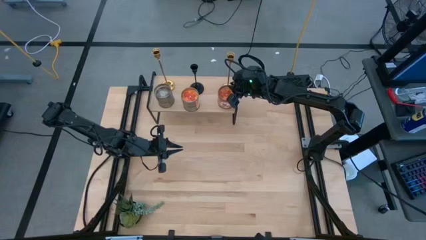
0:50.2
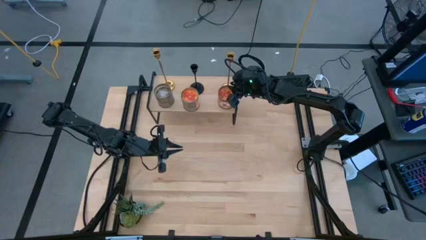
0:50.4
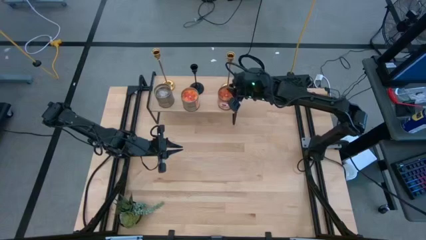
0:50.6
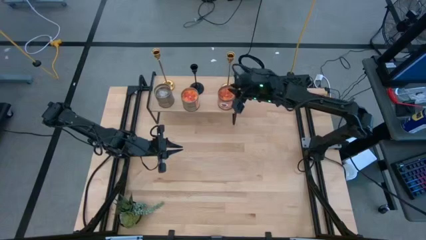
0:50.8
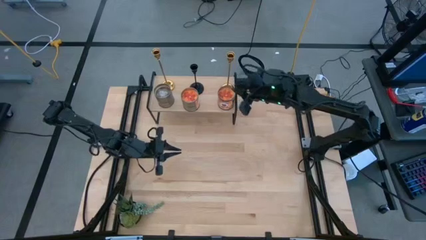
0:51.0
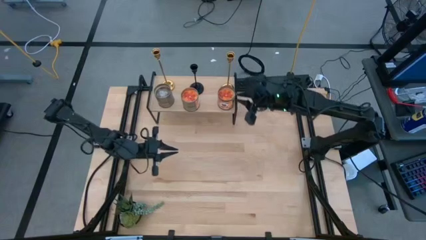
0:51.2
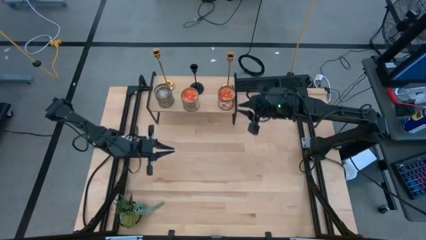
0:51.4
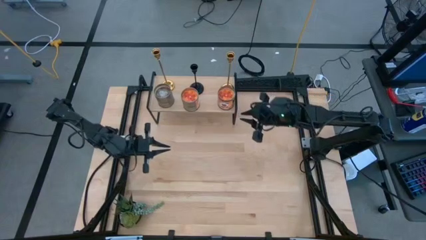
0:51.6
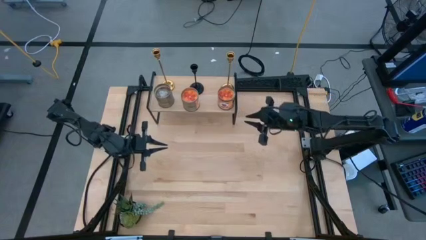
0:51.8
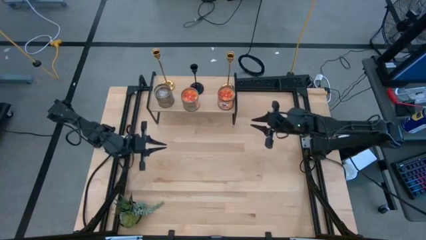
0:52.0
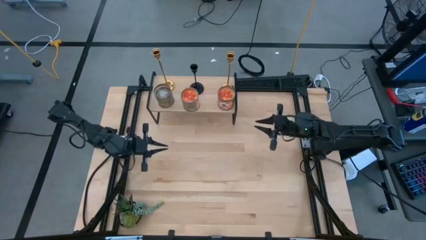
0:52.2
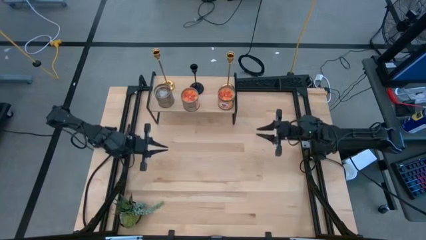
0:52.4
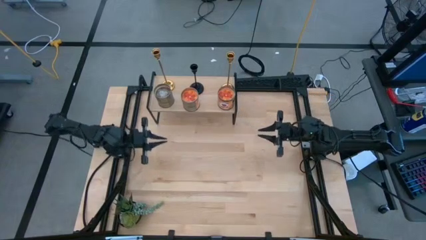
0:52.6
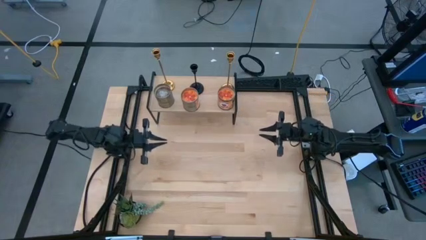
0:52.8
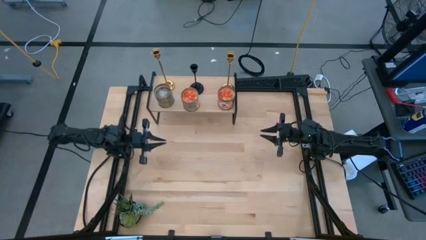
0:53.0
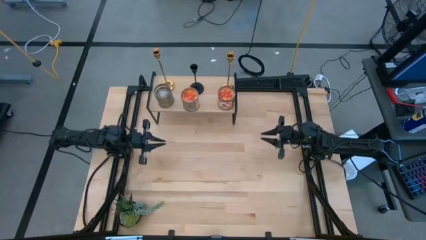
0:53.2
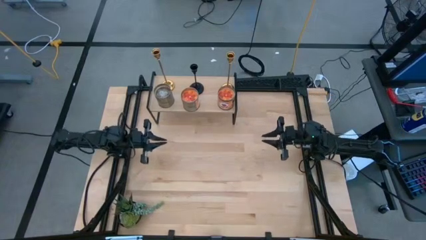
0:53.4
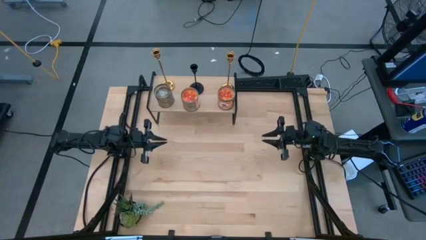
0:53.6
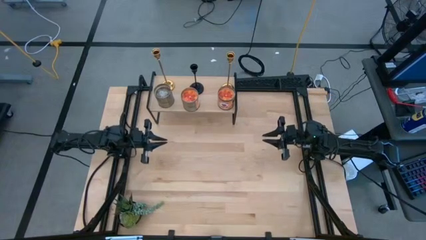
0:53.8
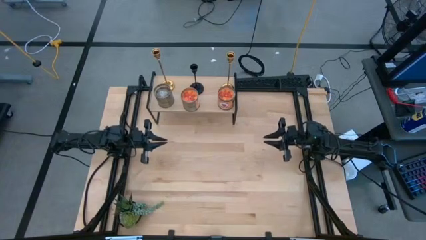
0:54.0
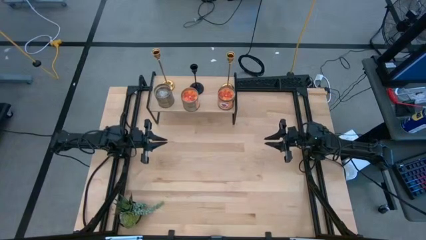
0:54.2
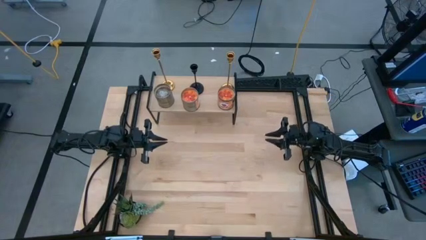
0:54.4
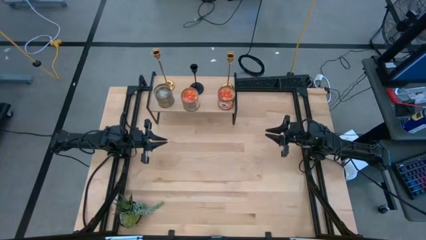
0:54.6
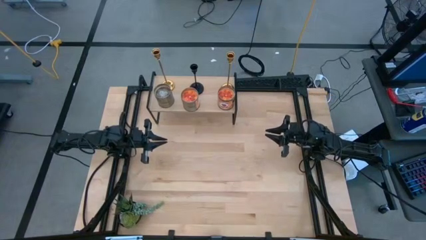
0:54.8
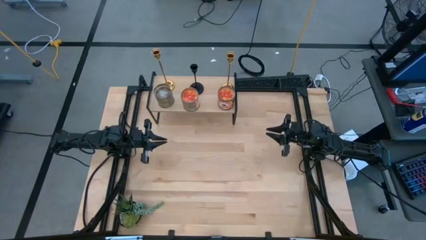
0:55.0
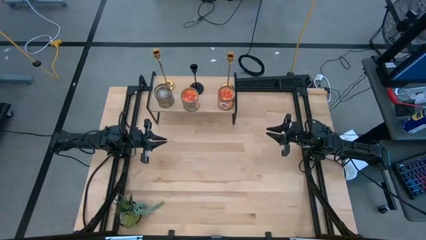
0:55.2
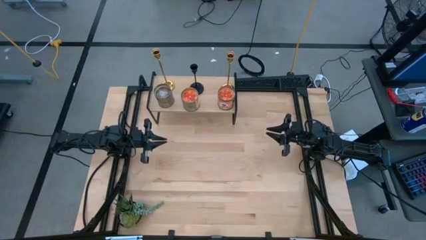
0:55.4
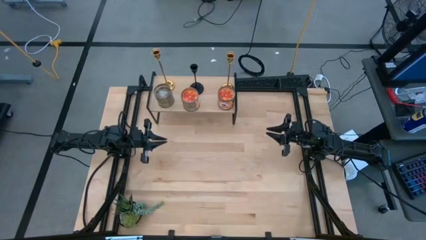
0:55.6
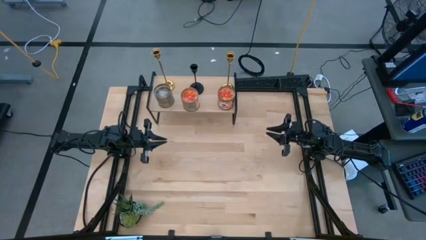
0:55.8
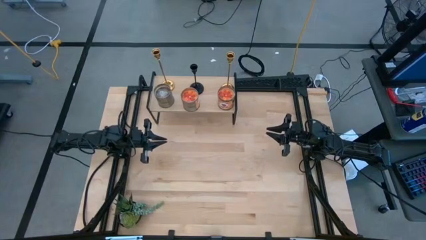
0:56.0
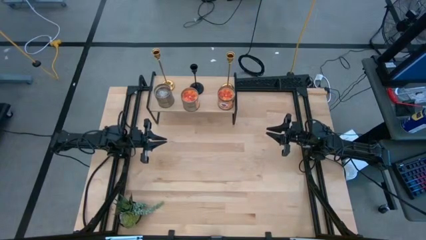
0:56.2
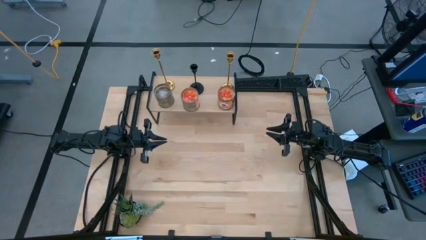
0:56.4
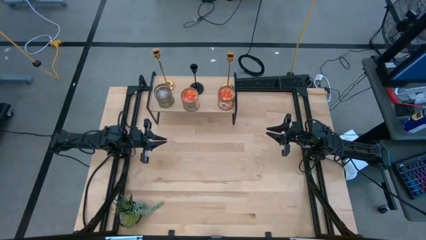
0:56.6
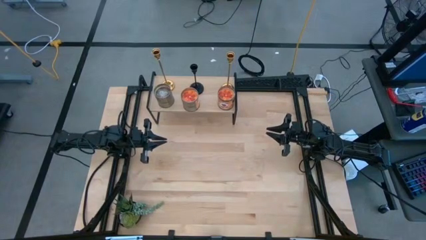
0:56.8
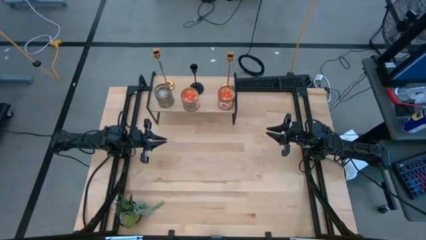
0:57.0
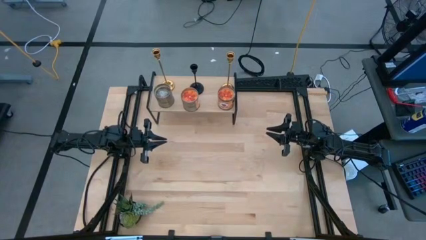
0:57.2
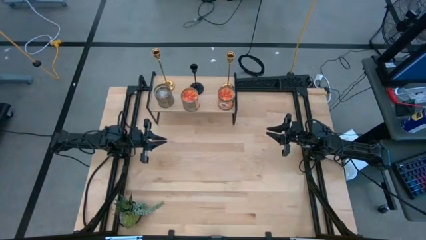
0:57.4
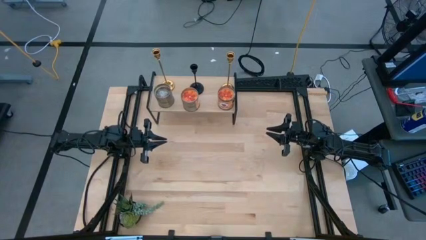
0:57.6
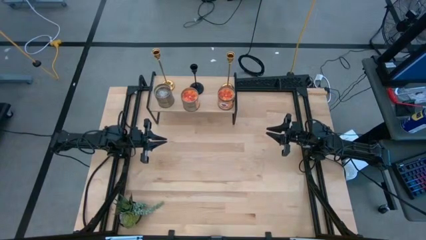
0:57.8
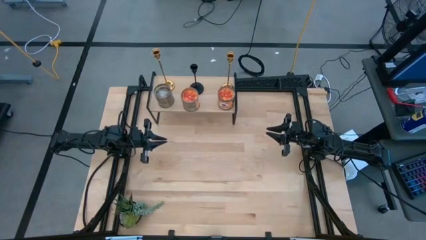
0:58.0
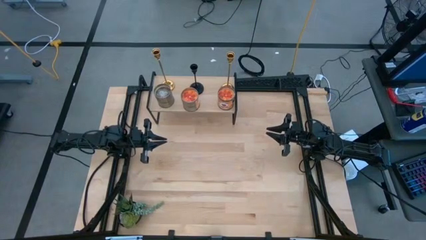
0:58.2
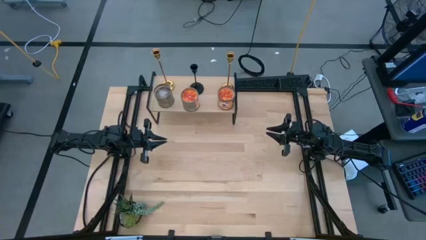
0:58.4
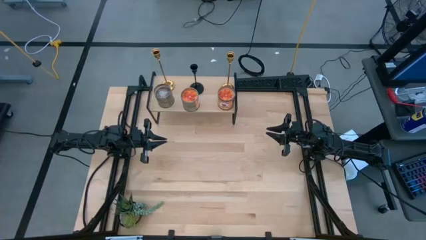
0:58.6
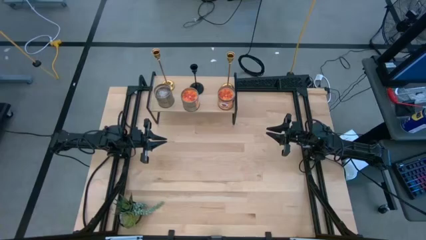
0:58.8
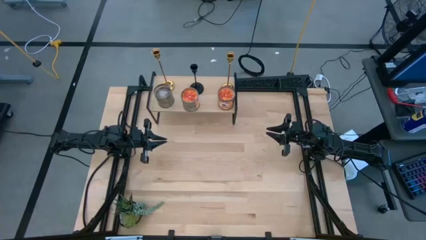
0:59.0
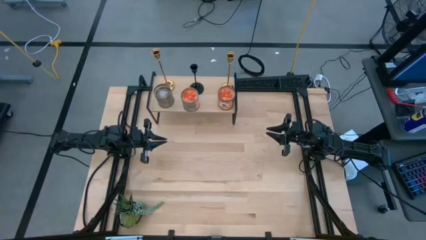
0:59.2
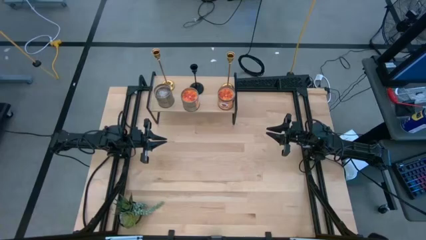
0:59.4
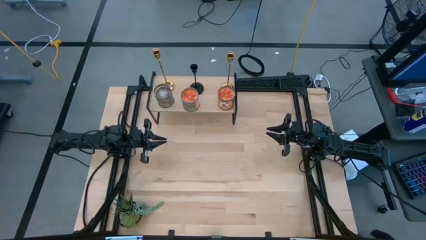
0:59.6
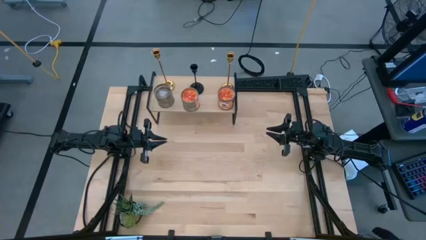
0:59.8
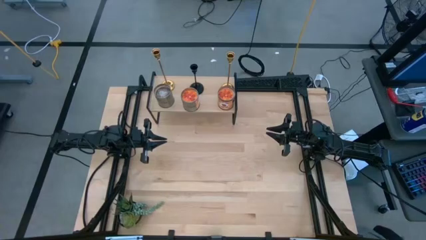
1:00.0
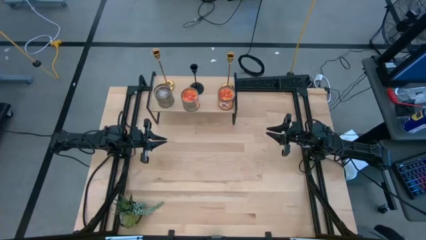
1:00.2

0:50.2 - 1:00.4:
Task: Pick & Place candle stick holders
Return to Home Position
